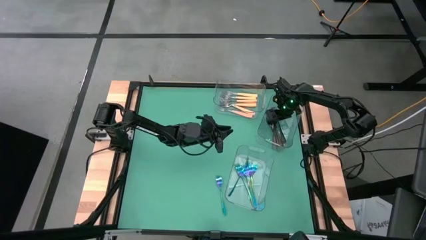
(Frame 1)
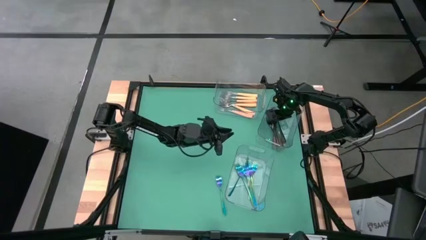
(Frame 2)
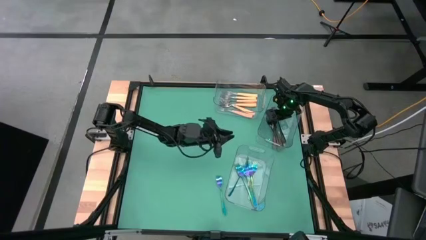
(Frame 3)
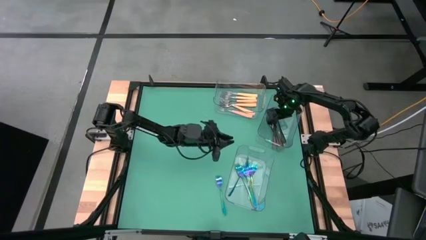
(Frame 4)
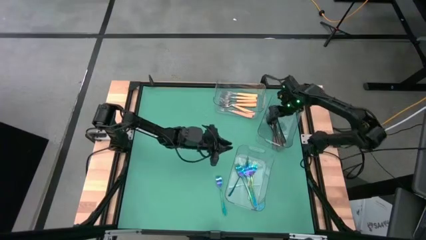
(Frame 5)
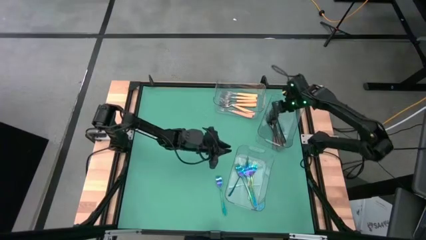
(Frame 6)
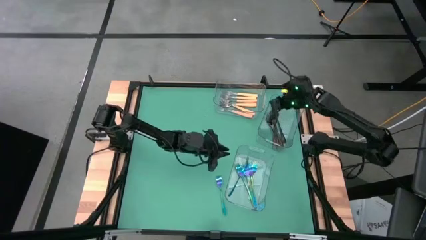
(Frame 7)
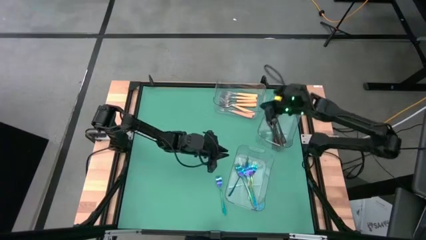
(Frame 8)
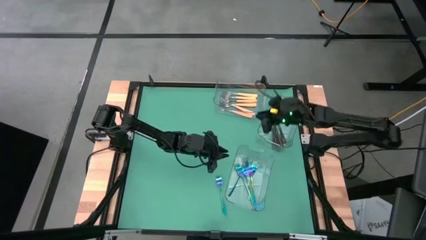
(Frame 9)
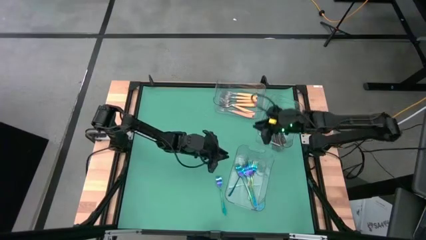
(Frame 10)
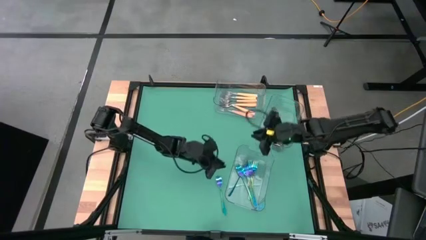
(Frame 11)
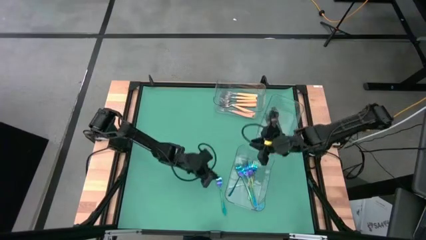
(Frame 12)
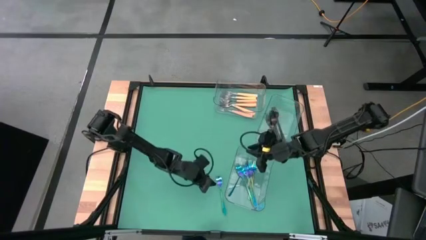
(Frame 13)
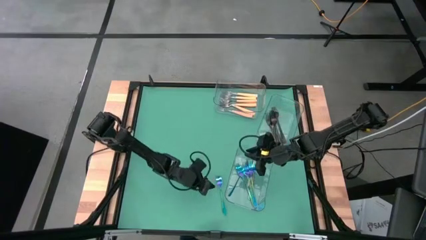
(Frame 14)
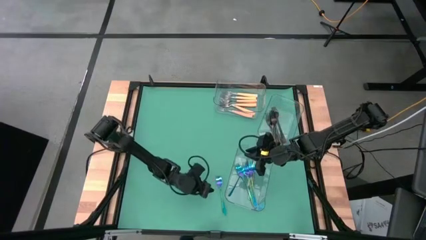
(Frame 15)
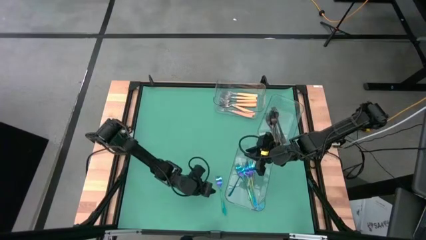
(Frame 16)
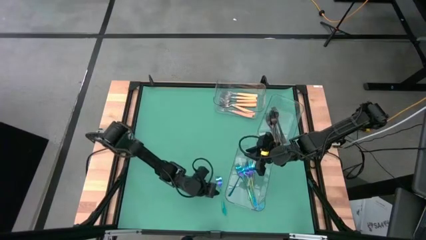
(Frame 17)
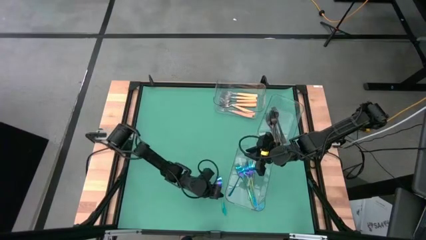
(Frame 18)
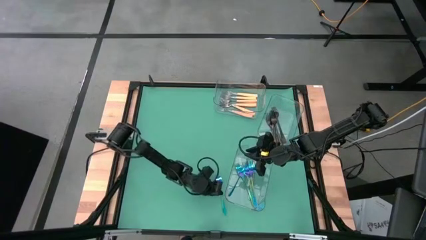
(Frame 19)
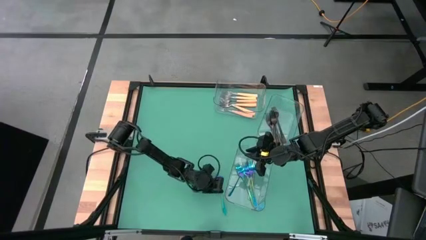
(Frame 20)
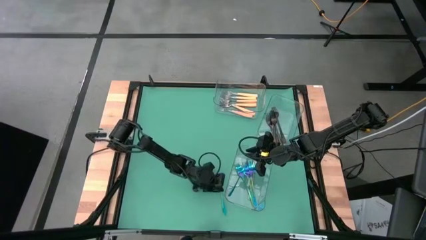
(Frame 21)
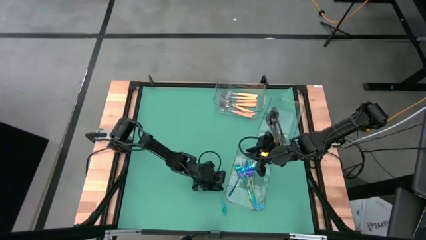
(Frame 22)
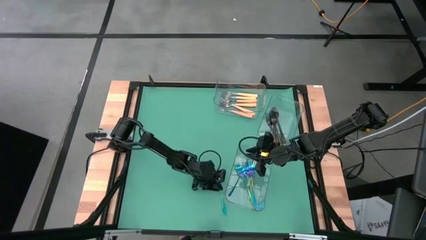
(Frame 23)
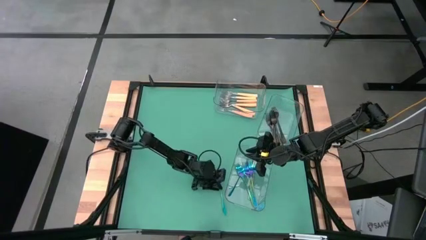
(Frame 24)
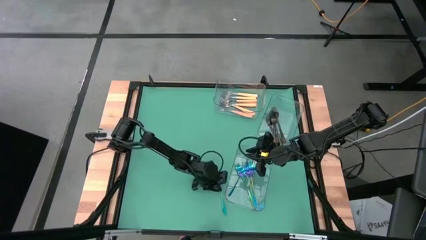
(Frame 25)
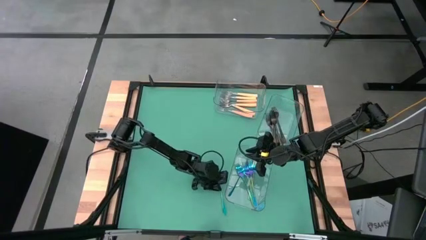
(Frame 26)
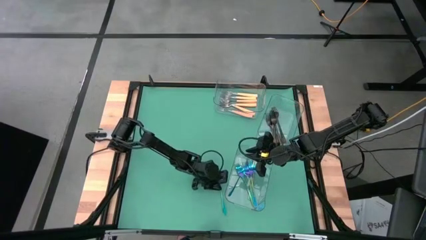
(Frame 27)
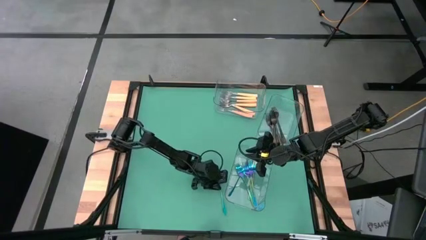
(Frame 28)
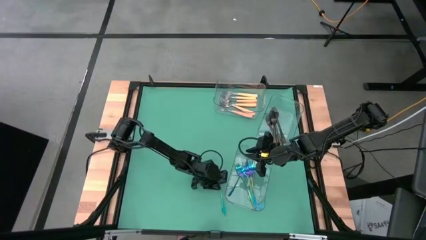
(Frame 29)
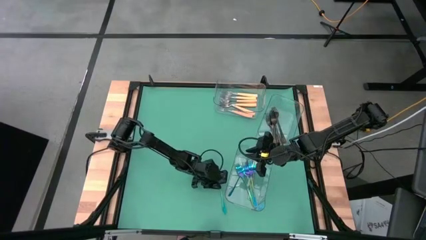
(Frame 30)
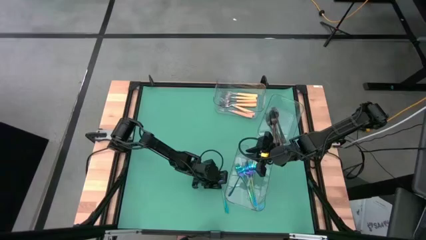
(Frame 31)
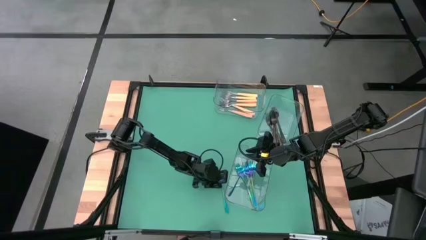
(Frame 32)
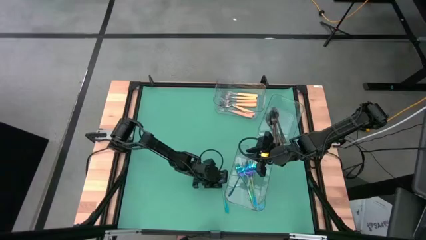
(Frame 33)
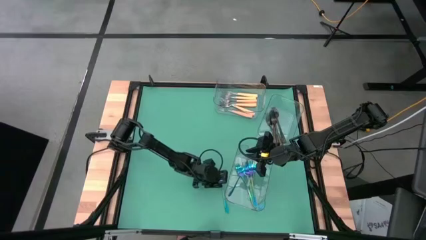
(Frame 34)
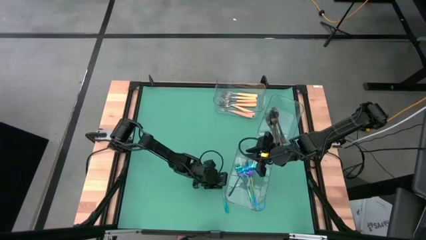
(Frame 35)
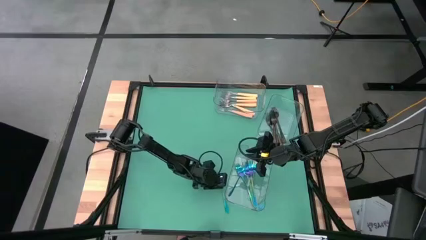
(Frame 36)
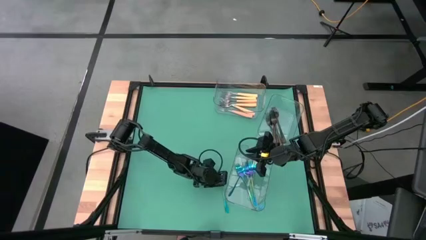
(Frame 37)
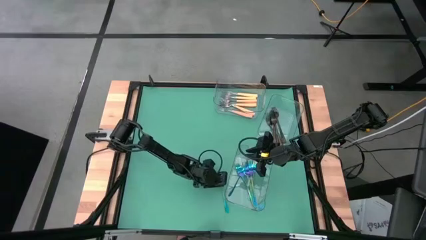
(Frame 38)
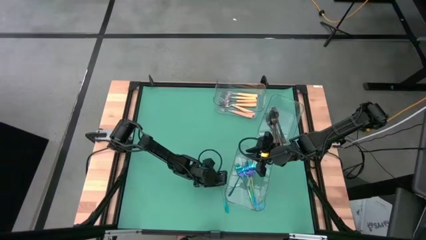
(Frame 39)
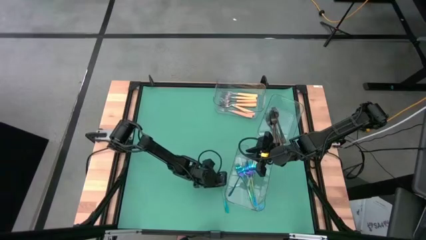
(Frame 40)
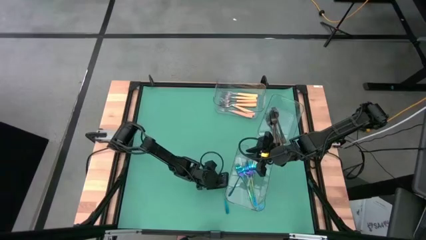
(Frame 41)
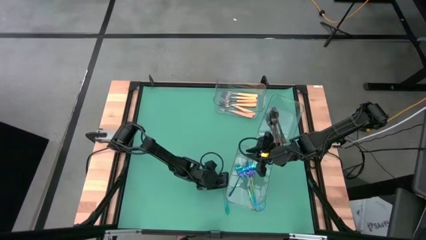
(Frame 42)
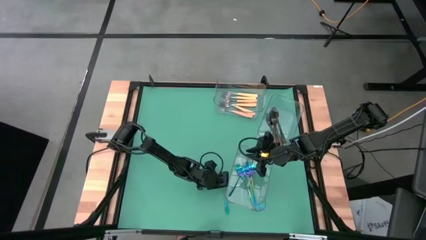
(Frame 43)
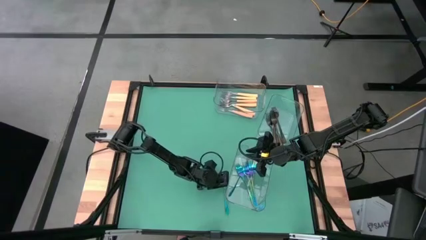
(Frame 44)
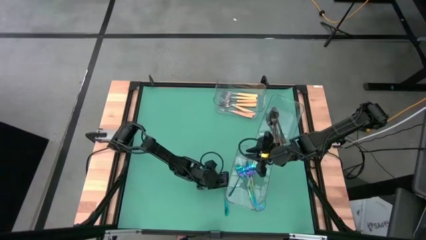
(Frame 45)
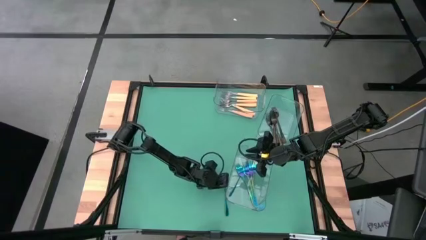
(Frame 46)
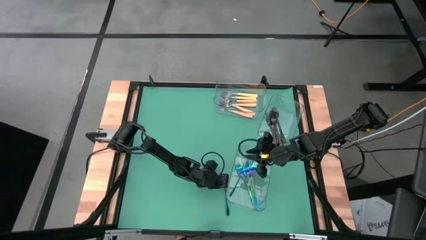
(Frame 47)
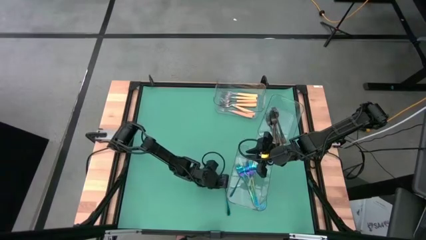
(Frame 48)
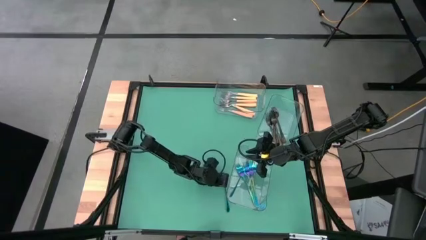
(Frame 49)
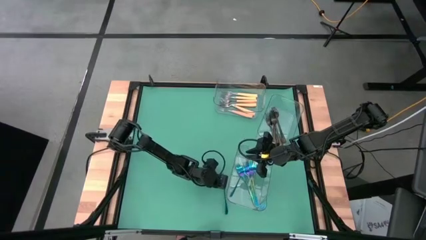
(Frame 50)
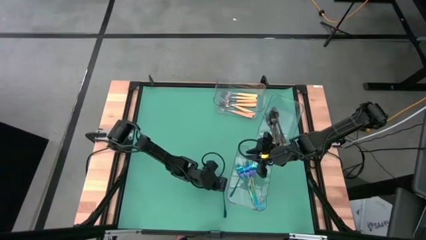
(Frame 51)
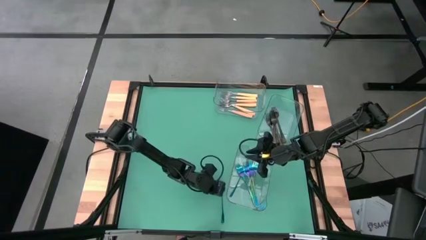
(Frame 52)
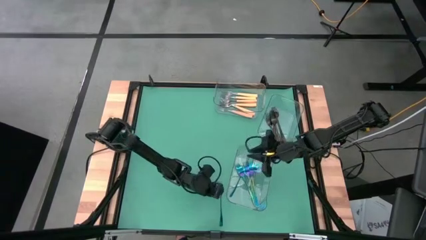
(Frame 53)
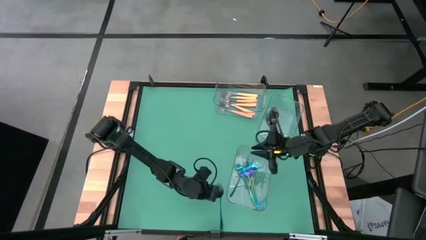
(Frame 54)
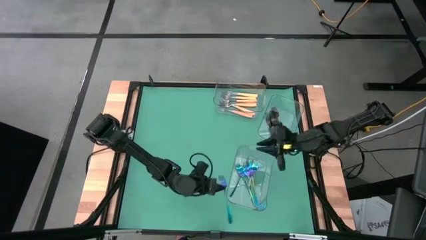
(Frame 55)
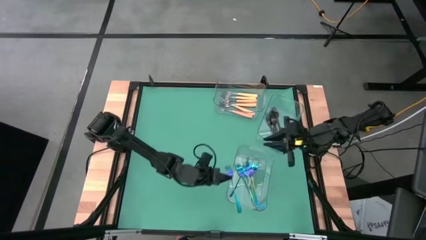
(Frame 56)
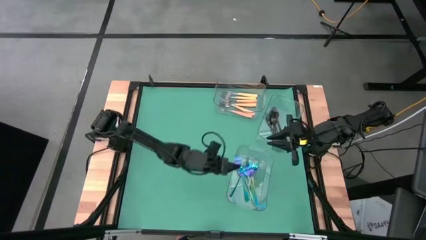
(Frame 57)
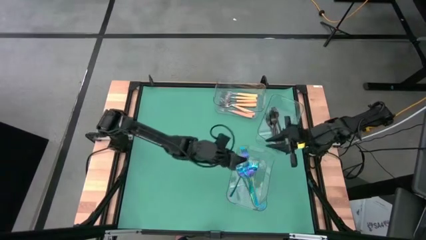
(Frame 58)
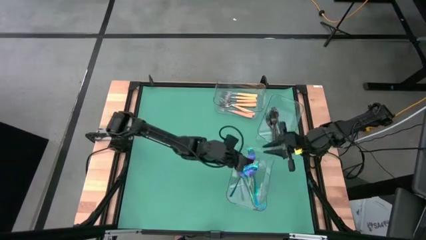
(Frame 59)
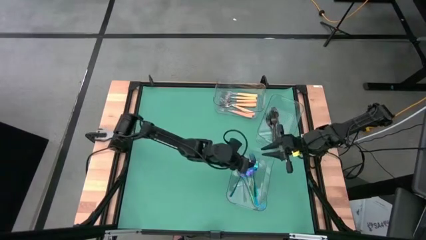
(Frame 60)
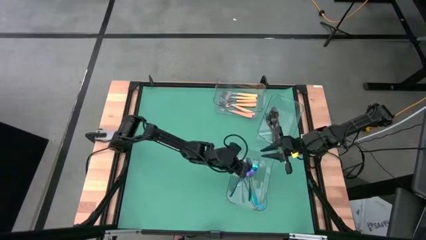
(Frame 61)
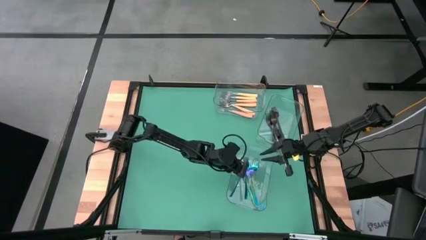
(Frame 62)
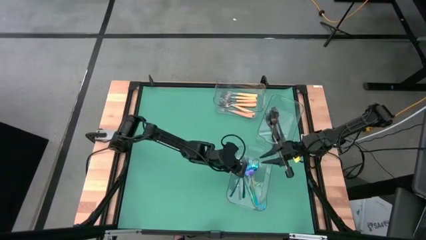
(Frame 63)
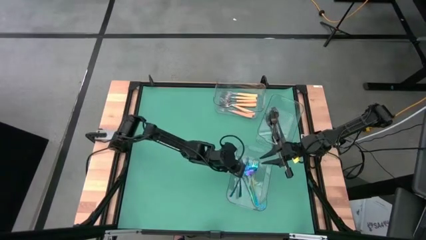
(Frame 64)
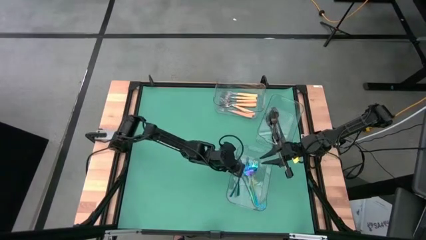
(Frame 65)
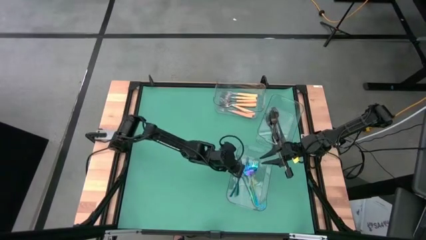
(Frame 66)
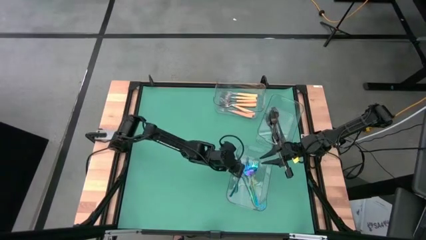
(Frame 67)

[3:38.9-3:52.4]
Task: Sort silverware by color (type)
Put the blue fork into the bottom transparent bin

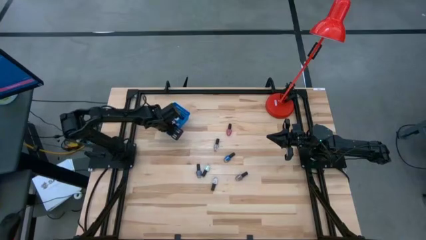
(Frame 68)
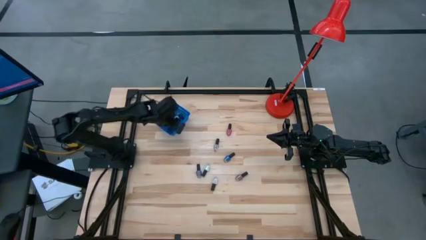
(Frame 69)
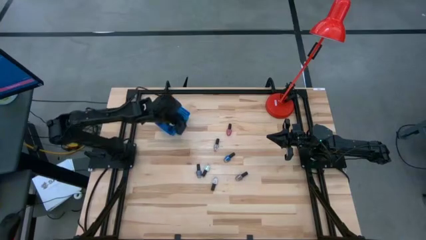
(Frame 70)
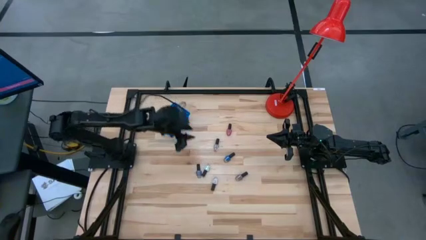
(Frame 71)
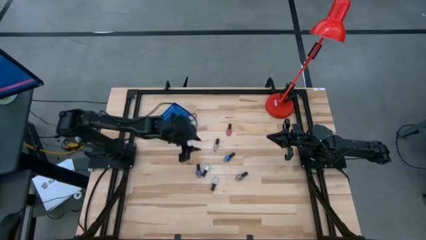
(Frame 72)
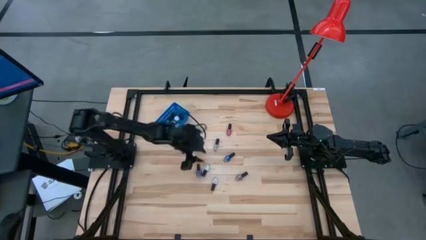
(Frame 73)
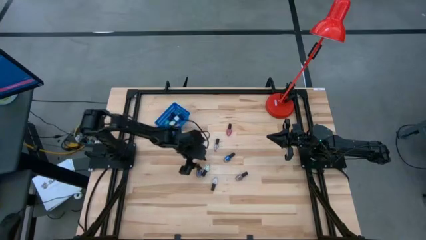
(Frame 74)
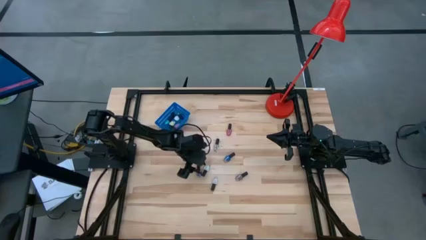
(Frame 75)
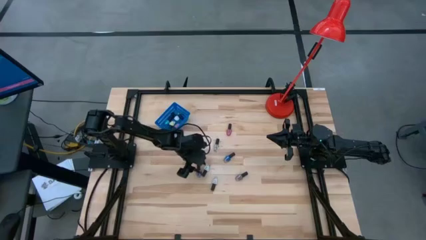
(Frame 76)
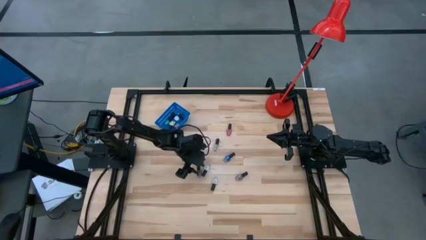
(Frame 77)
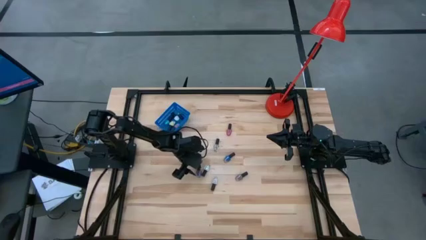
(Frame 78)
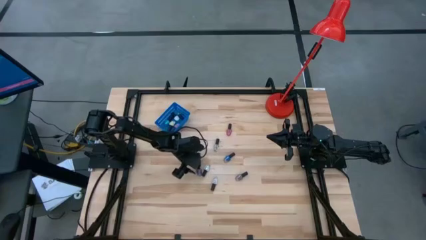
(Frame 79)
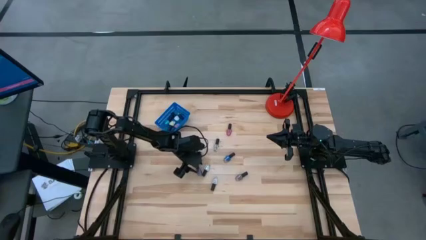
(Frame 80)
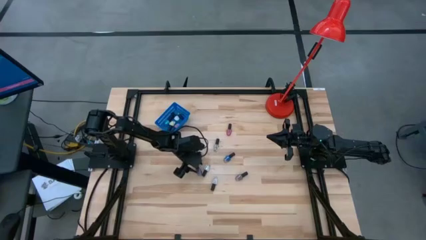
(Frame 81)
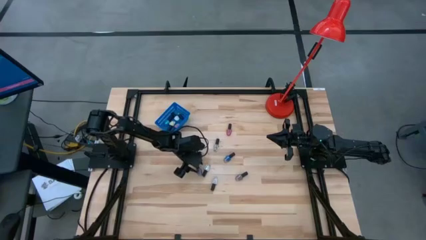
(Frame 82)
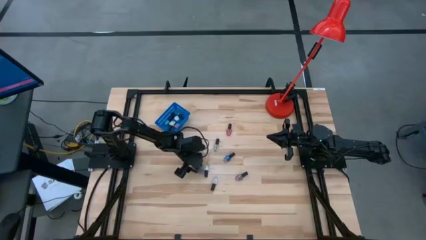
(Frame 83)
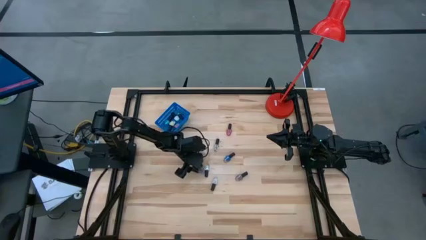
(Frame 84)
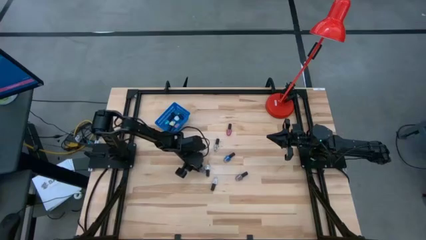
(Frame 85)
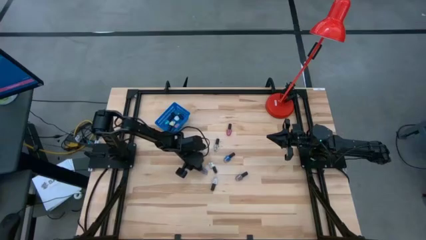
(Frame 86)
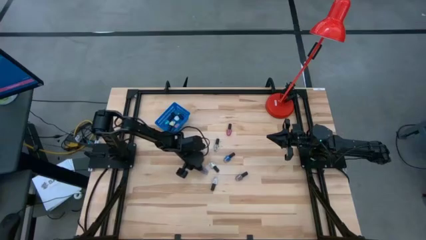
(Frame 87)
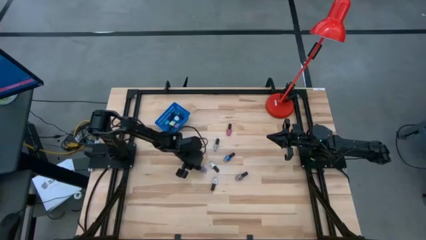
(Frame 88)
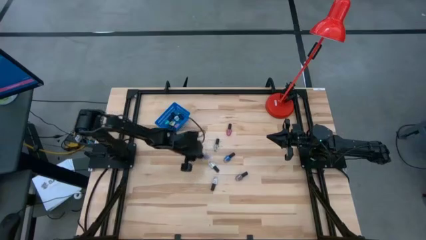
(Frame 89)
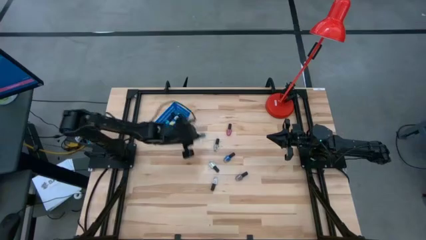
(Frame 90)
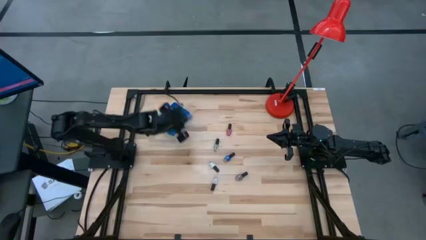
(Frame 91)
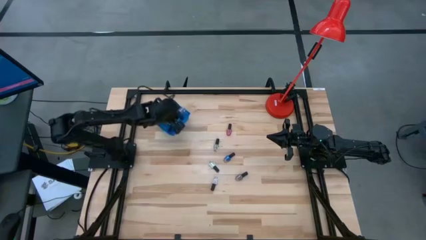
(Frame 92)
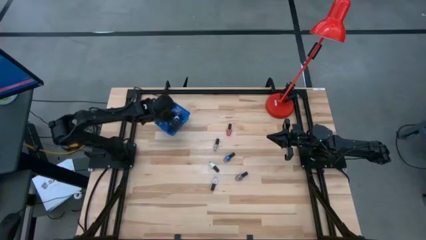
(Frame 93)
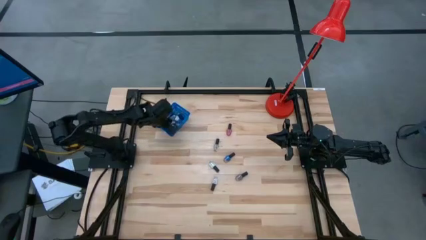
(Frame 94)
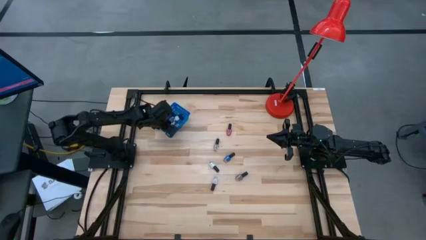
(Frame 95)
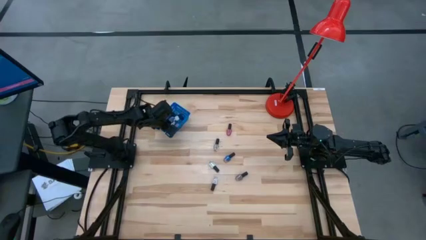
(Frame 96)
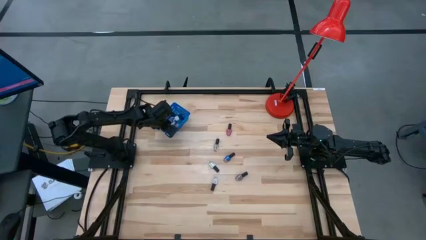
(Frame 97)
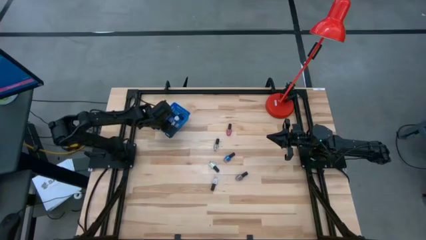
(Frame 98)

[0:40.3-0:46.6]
Task: Pick & Place Nail Polish
Put the purple nail polish bottle into the blue bin
